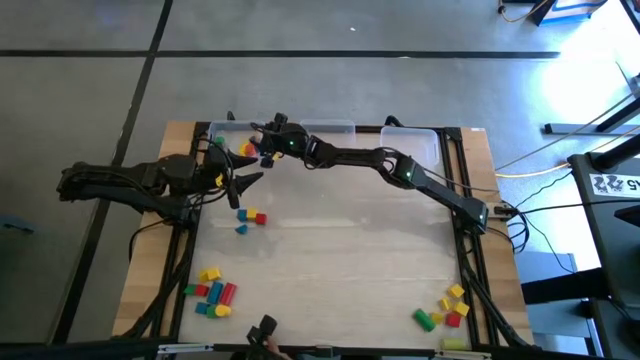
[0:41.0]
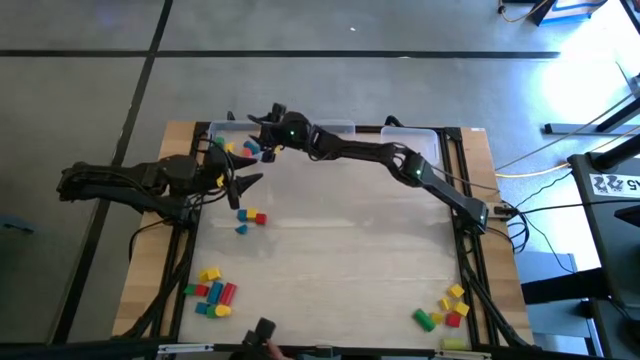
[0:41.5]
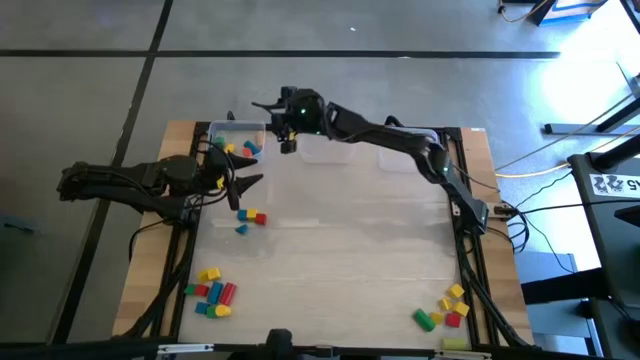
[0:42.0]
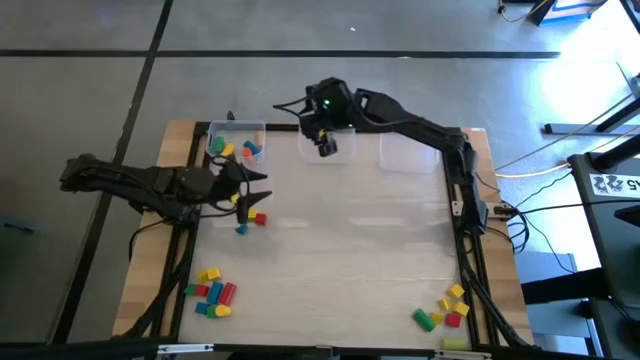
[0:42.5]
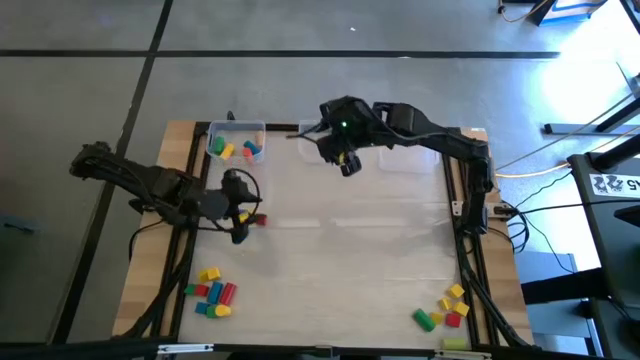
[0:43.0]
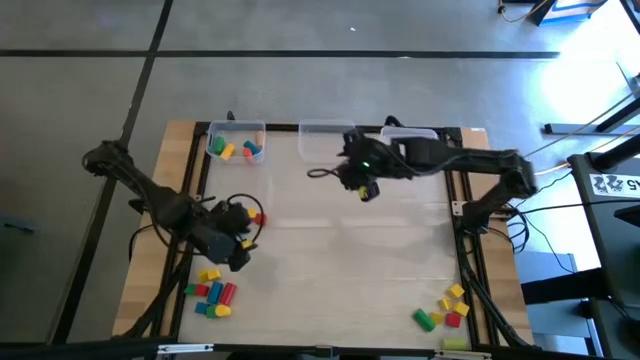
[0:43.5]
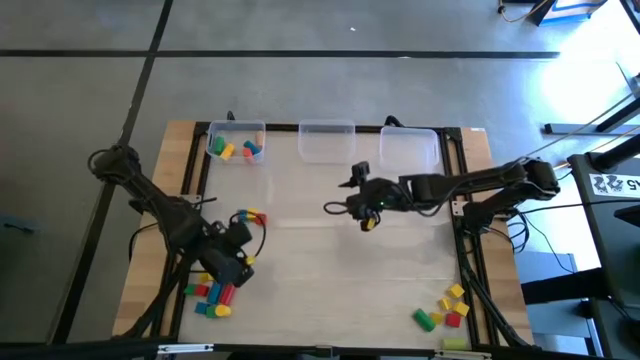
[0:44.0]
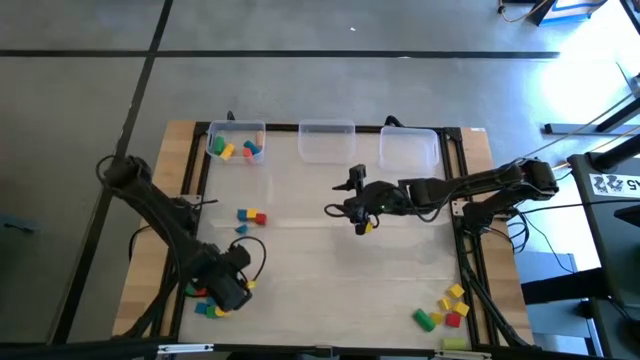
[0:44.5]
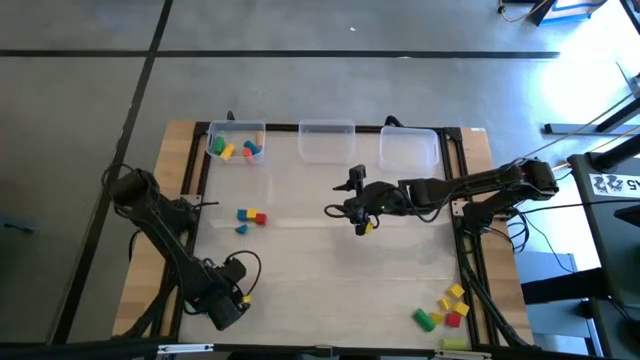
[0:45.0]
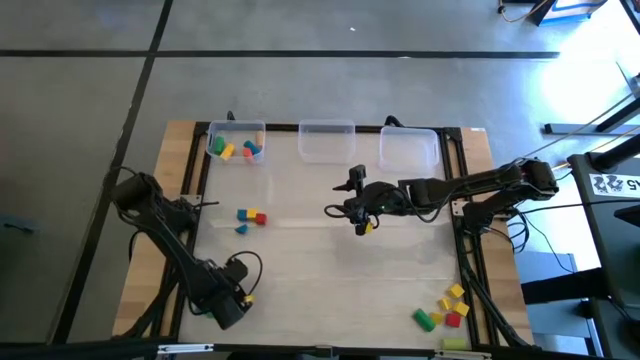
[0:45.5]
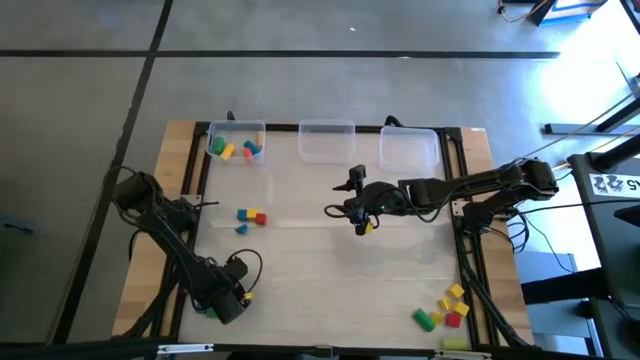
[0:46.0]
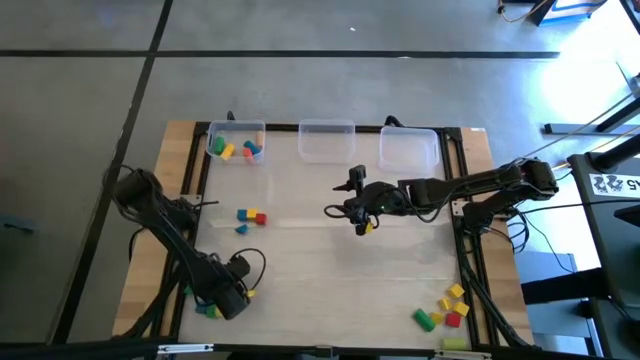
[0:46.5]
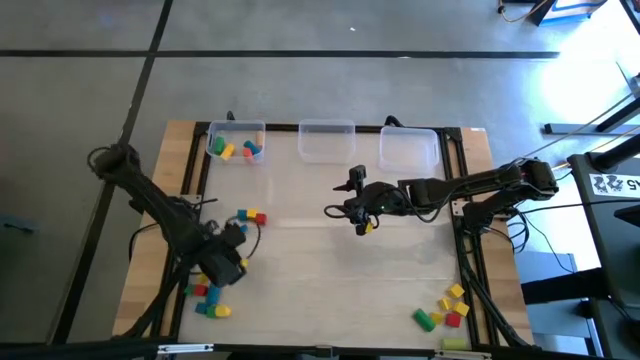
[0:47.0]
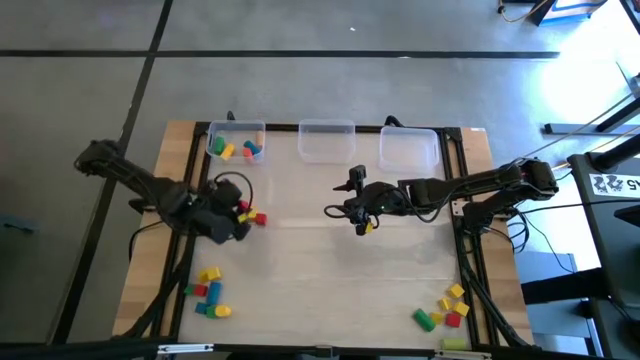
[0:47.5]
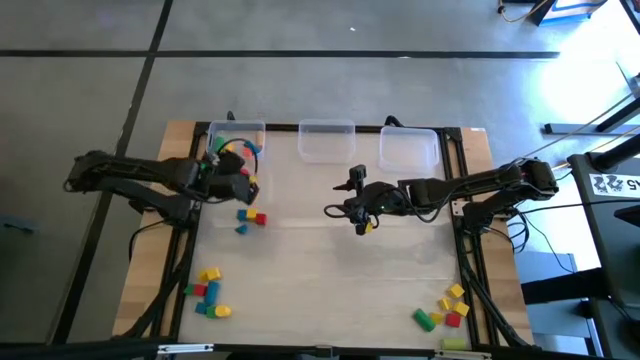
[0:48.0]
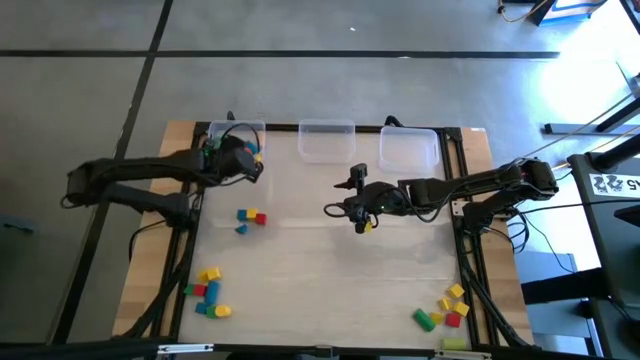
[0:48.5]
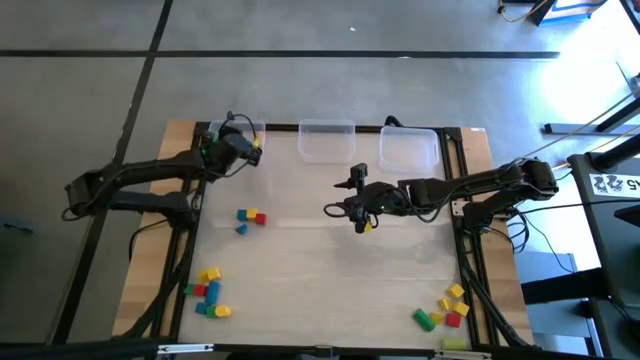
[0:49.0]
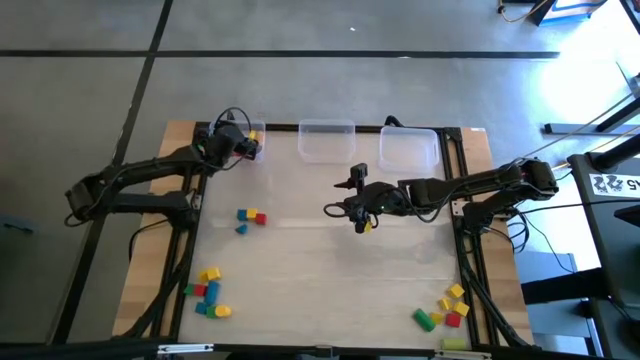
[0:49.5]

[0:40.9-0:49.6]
Task: Sort blocks by size
Put the cylindrical red block into the left transparent bin

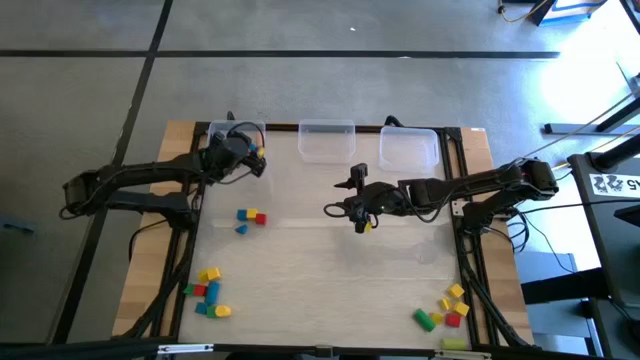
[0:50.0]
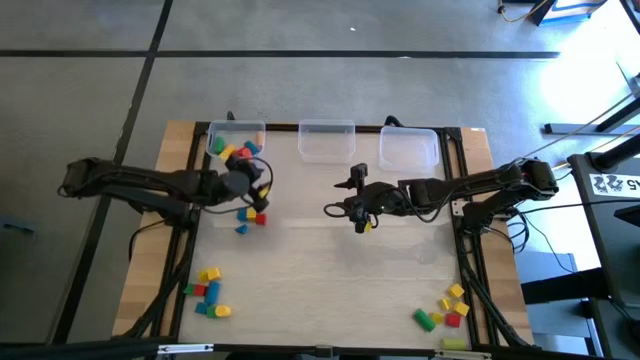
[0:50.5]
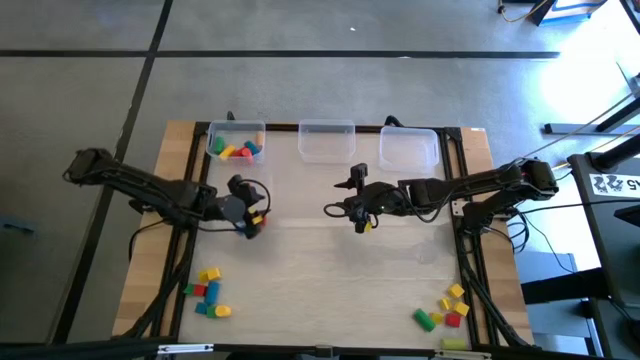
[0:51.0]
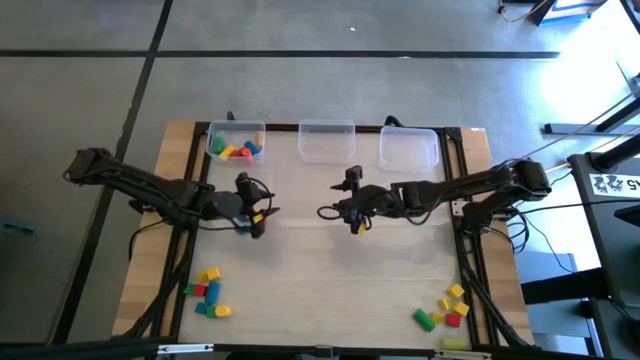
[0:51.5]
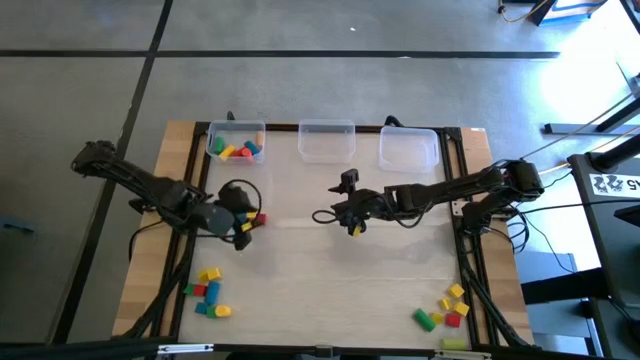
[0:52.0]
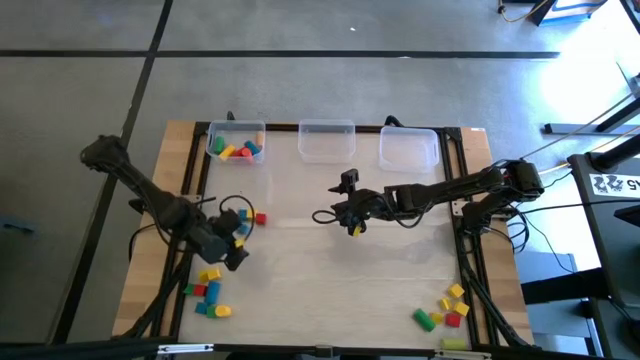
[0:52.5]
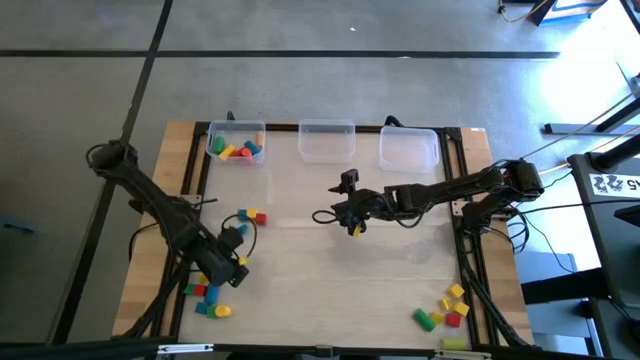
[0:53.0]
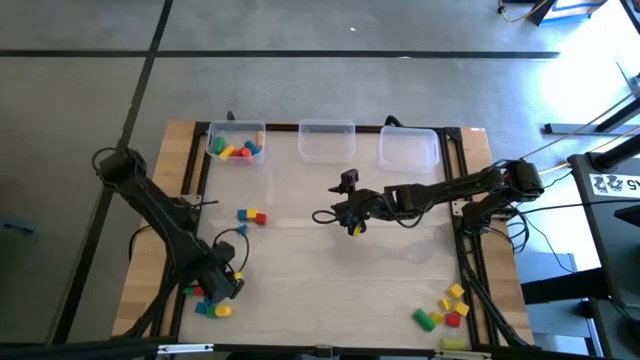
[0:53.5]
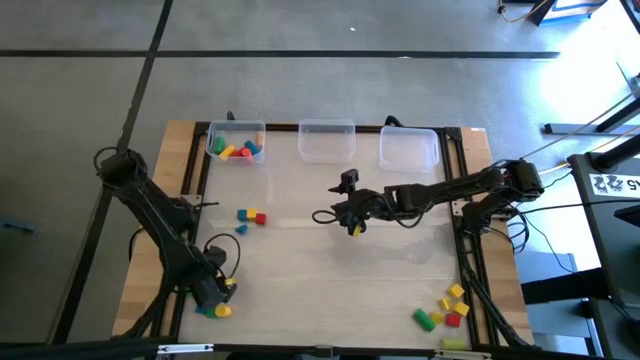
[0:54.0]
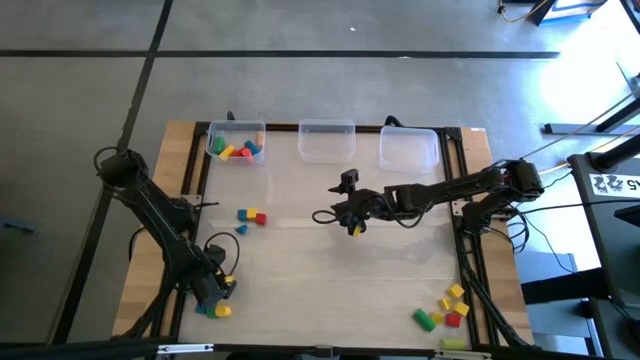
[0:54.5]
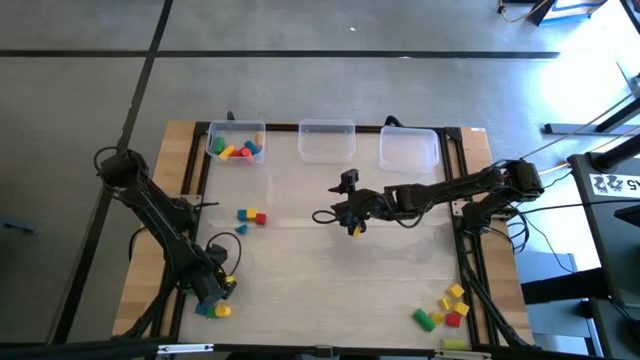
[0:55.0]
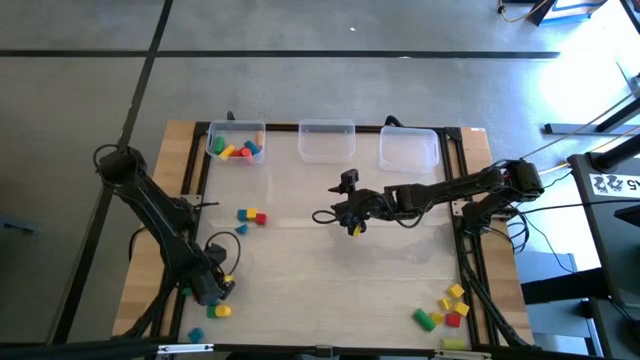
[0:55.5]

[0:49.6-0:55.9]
Put the cylindrical blue block into the left transparent bin

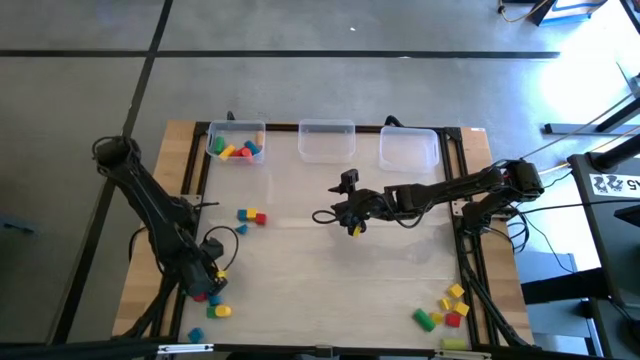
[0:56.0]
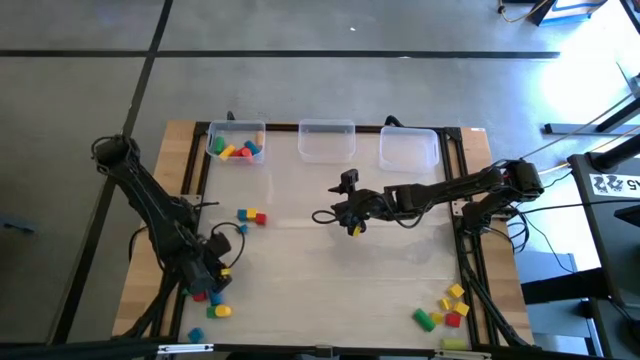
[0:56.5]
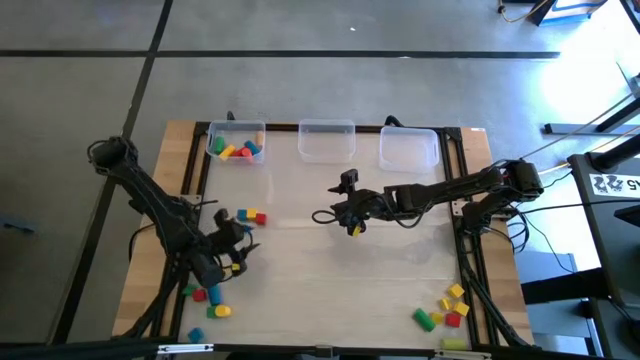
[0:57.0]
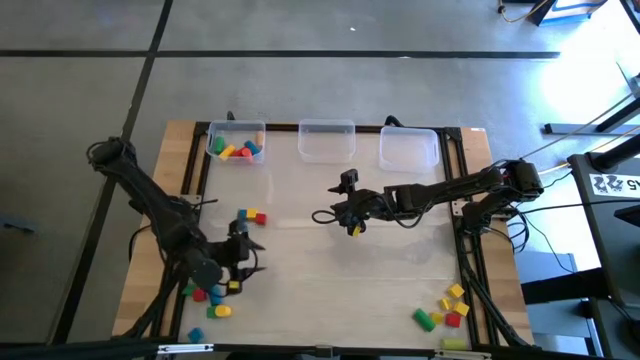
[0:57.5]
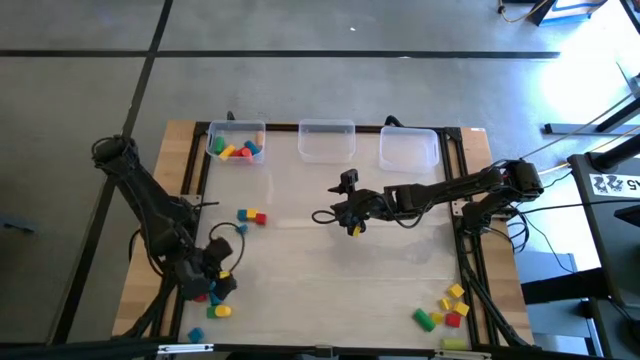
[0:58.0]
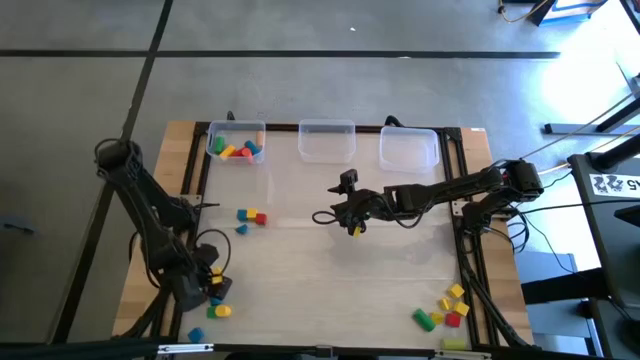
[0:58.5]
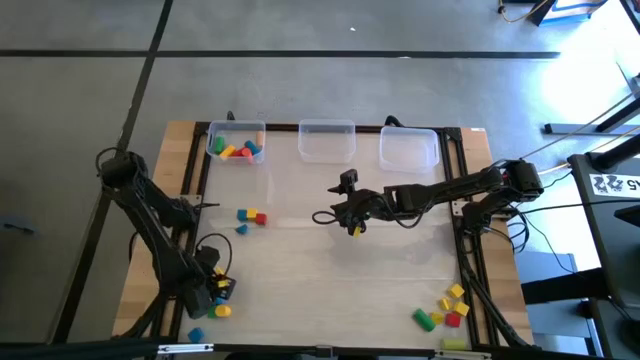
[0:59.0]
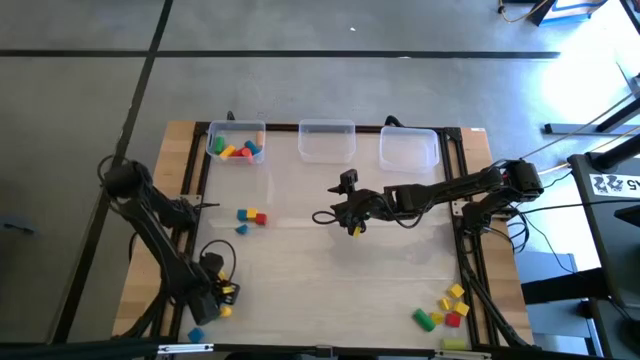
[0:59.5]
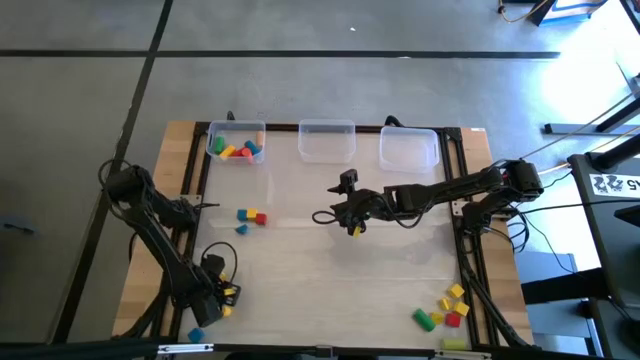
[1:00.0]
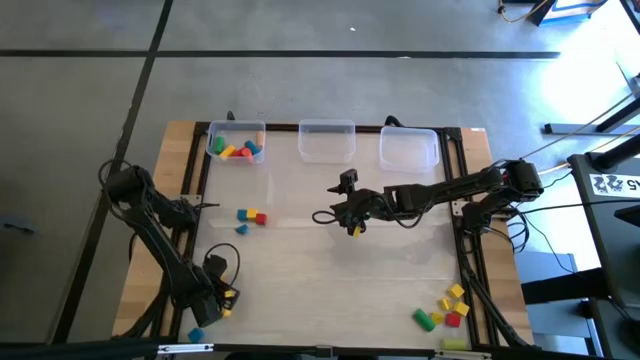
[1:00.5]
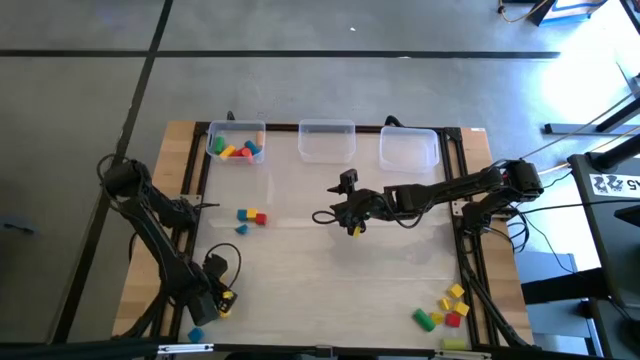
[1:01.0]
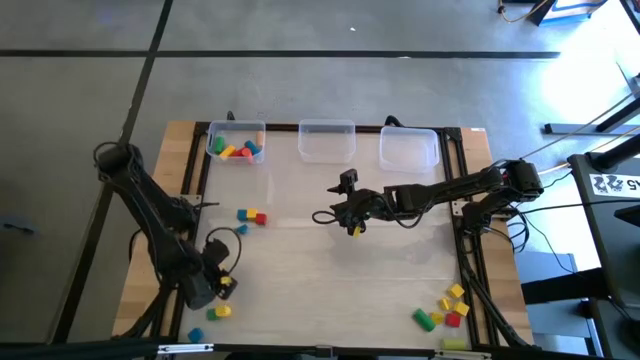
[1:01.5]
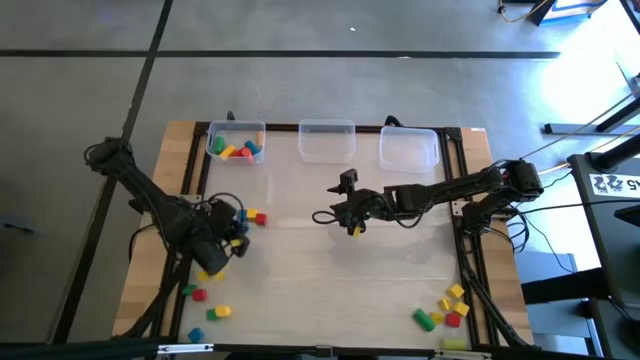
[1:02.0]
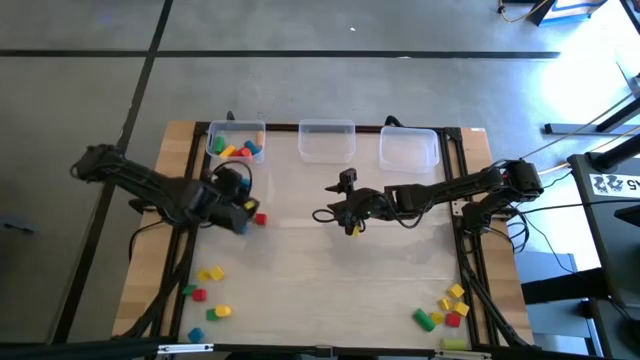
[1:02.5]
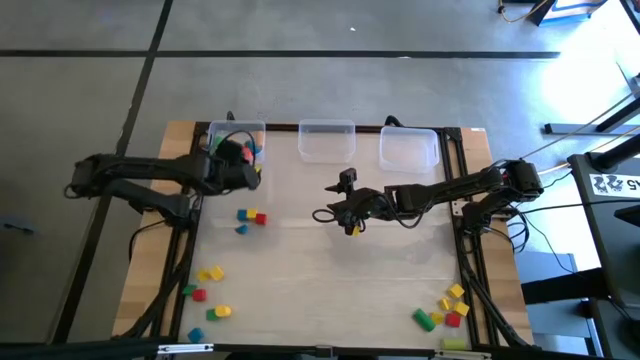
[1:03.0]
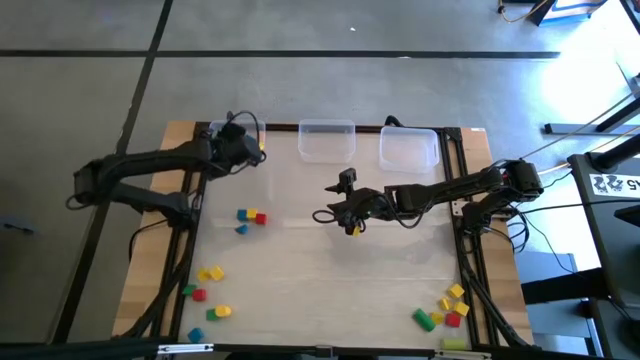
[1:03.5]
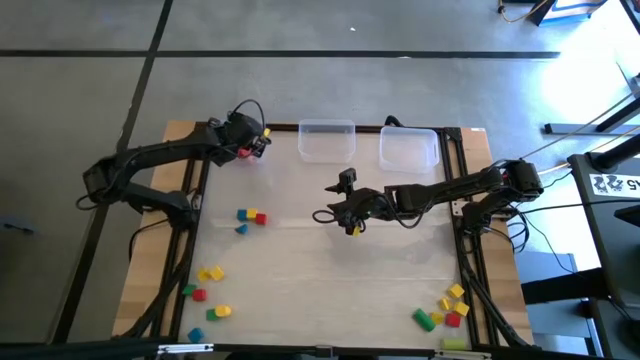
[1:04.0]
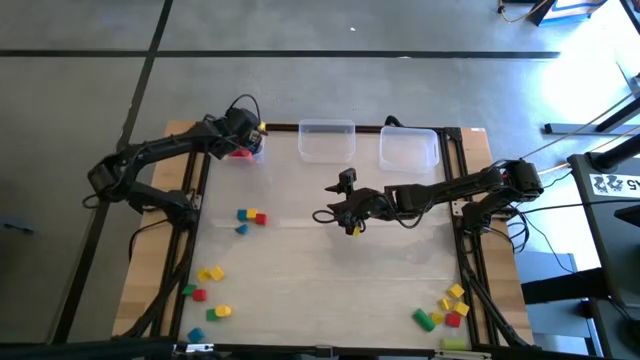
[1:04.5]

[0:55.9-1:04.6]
Put the cylindrical blue block into the left transparent bin
